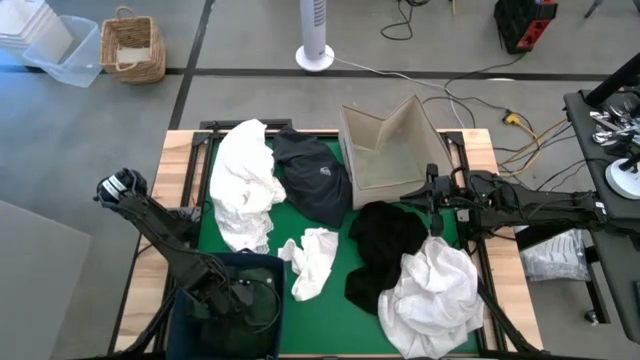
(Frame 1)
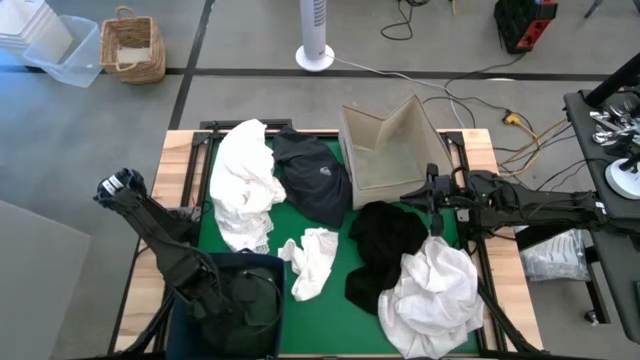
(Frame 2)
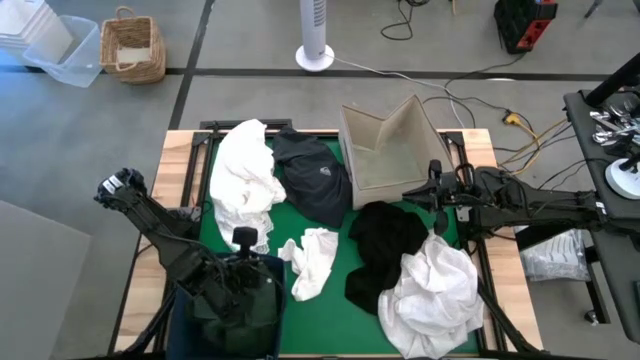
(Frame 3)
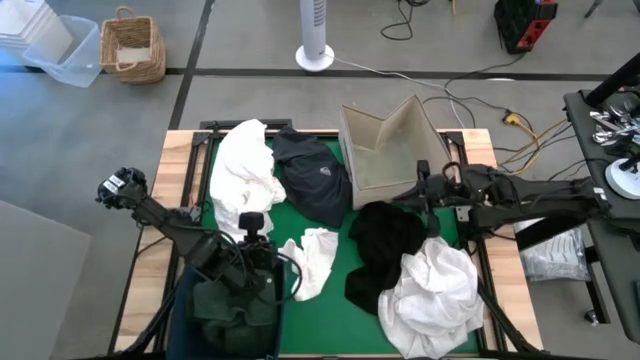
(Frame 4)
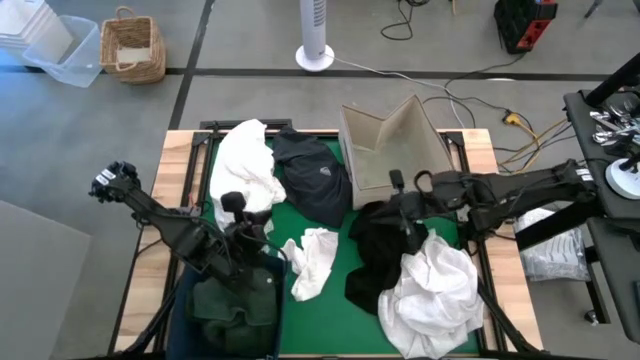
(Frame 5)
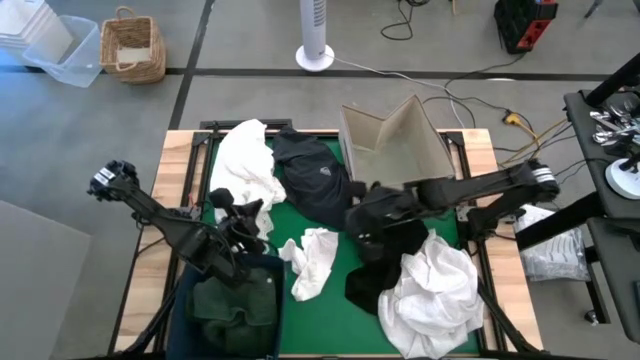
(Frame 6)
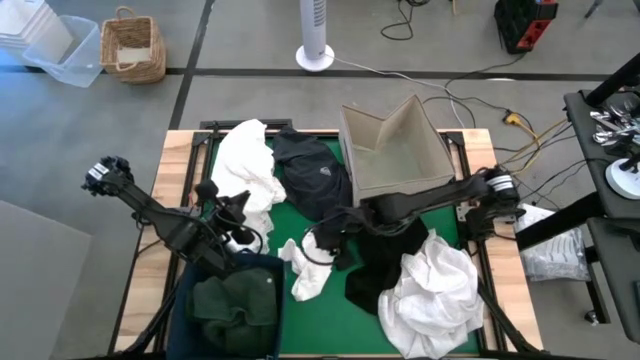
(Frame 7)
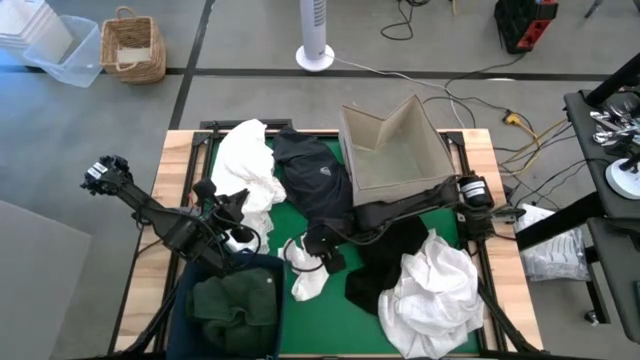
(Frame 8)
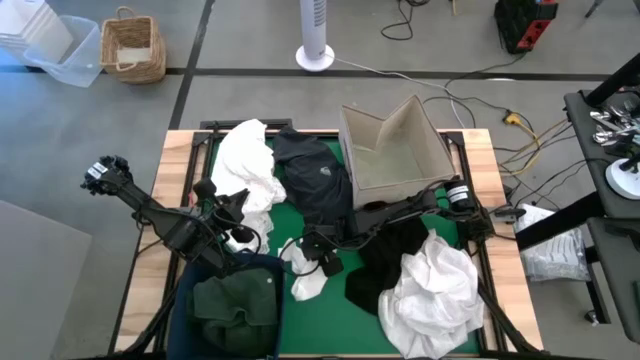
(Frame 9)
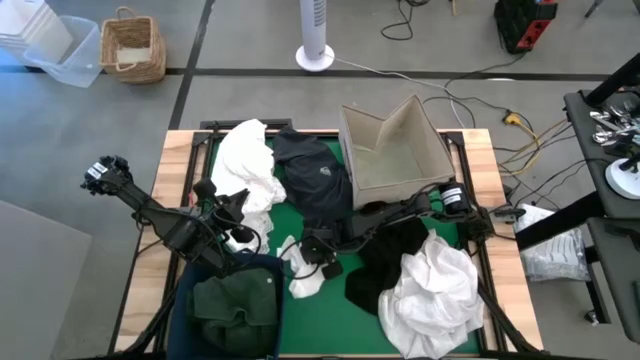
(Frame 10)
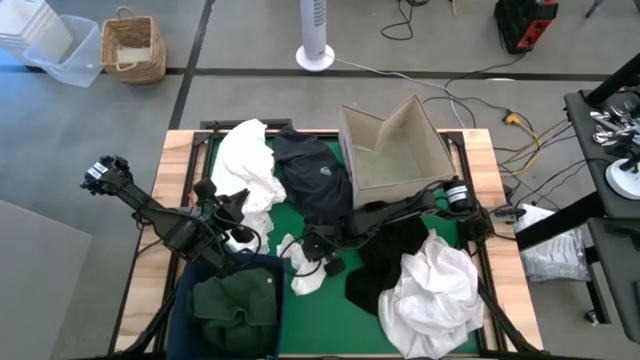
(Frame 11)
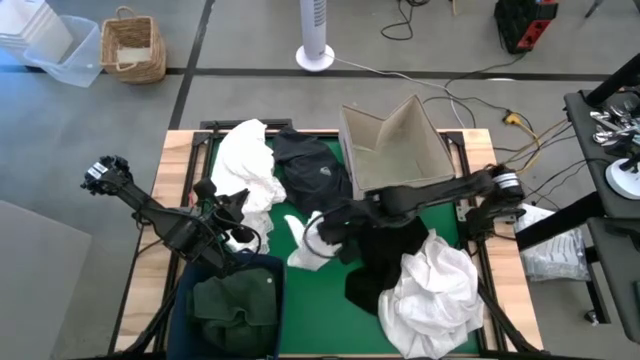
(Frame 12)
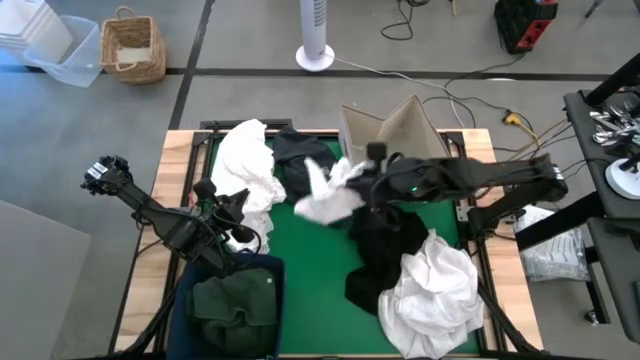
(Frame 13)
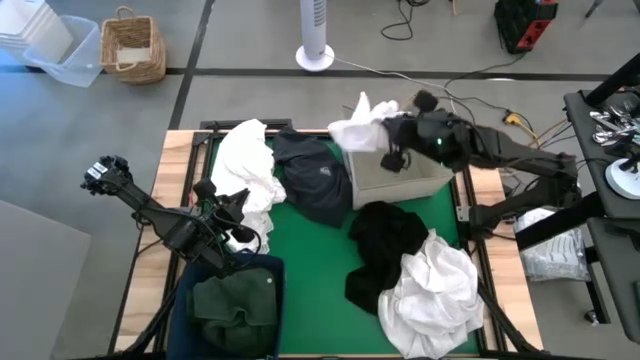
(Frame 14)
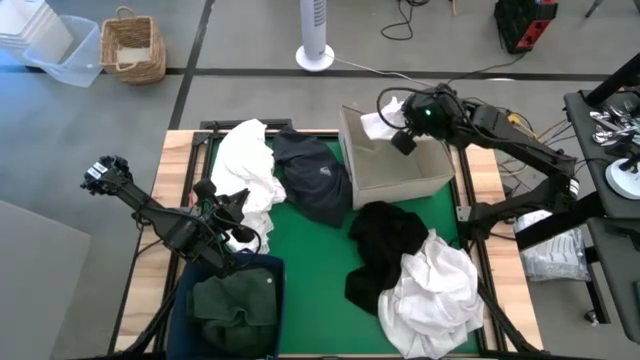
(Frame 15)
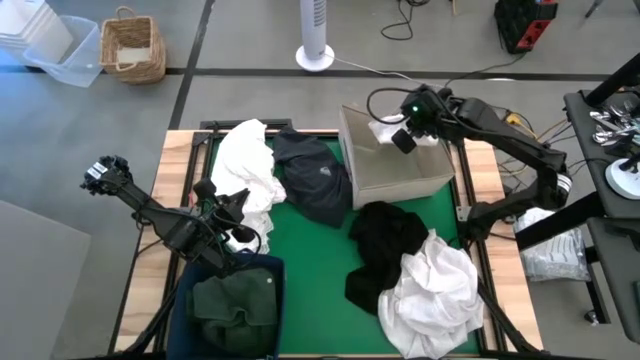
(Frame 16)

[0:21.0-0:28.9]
Put the white underwear into the brown laundry organizer

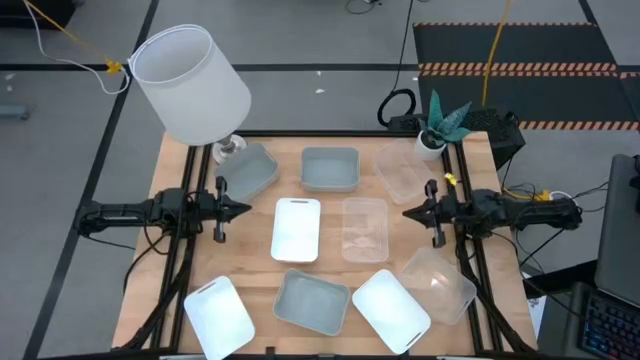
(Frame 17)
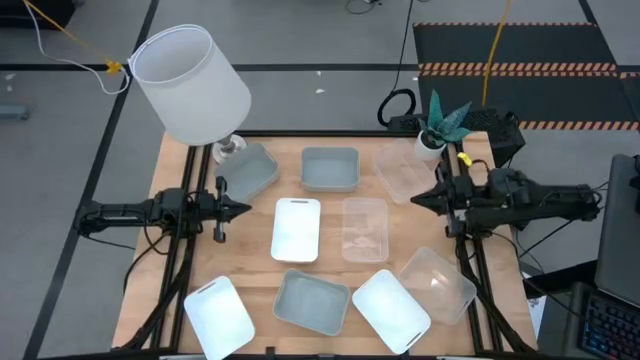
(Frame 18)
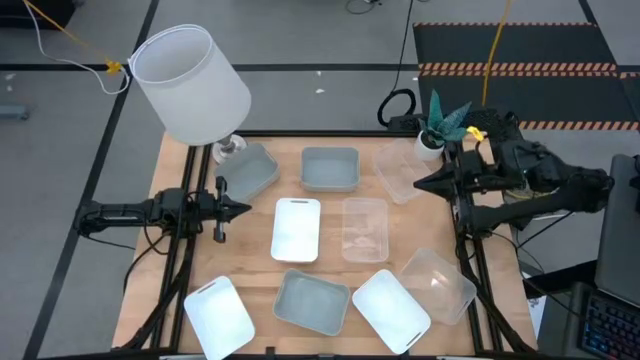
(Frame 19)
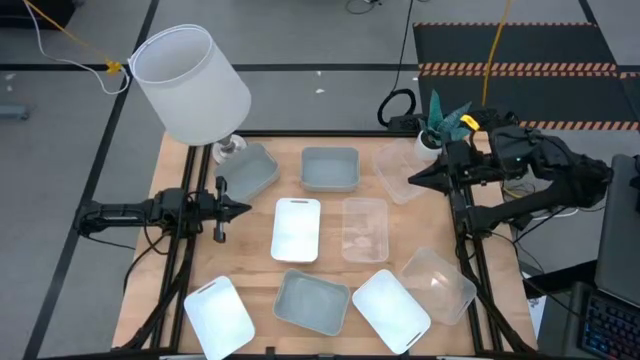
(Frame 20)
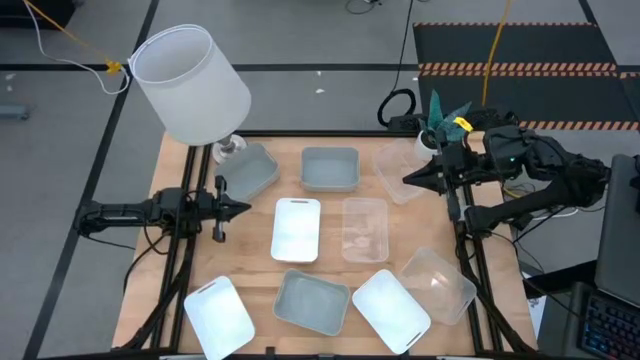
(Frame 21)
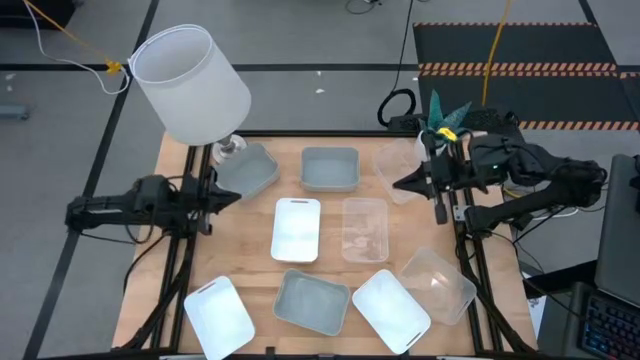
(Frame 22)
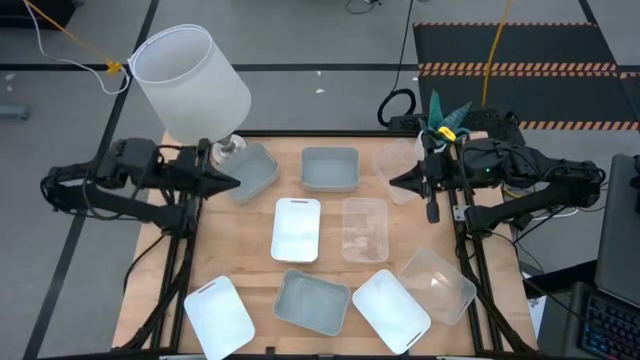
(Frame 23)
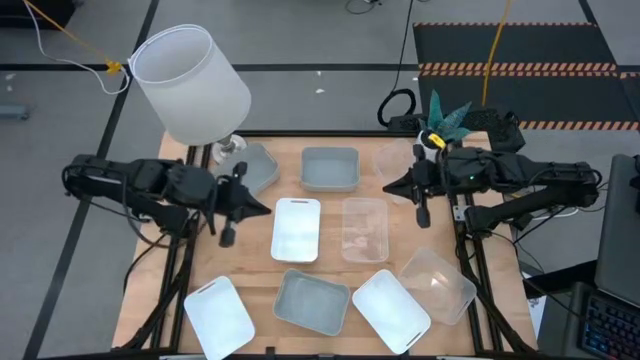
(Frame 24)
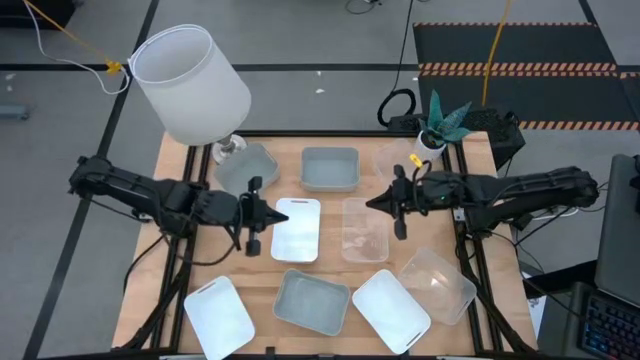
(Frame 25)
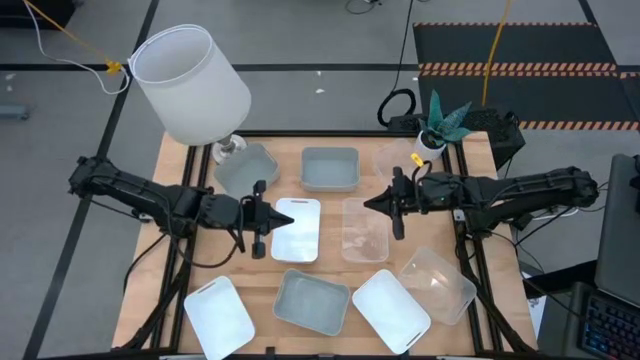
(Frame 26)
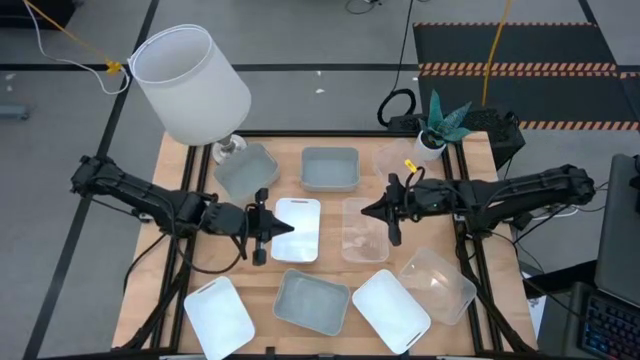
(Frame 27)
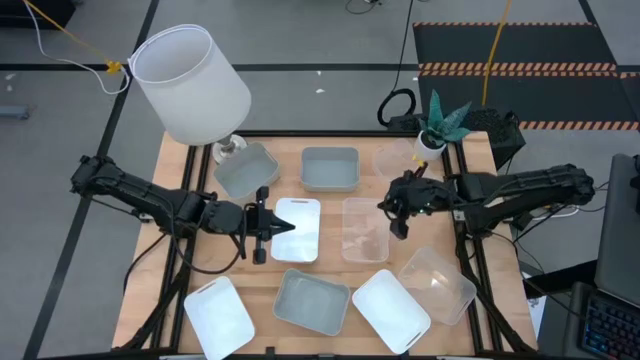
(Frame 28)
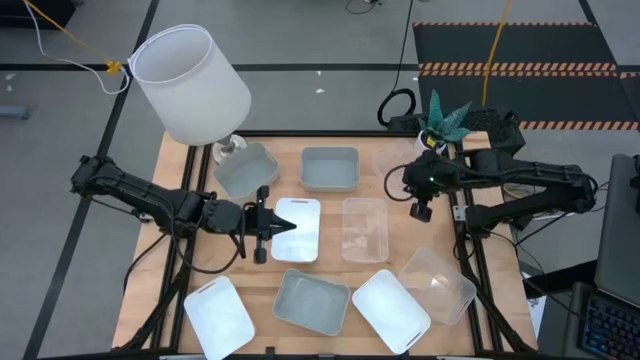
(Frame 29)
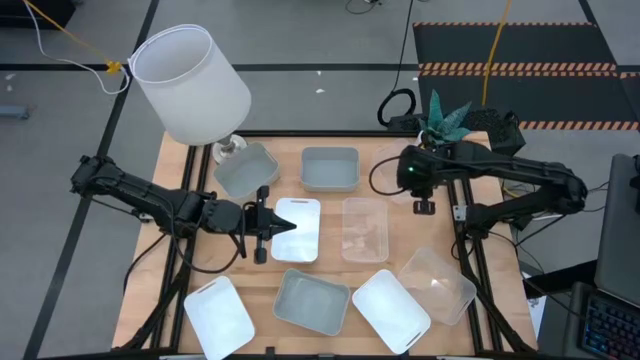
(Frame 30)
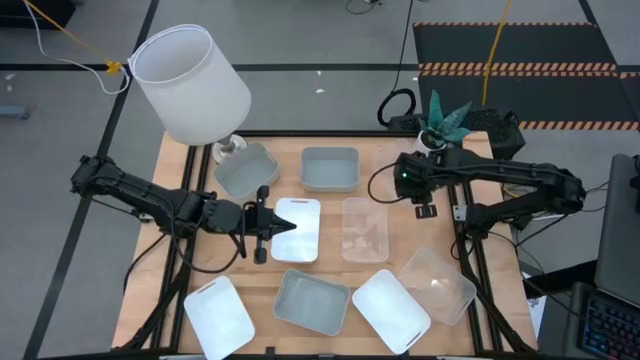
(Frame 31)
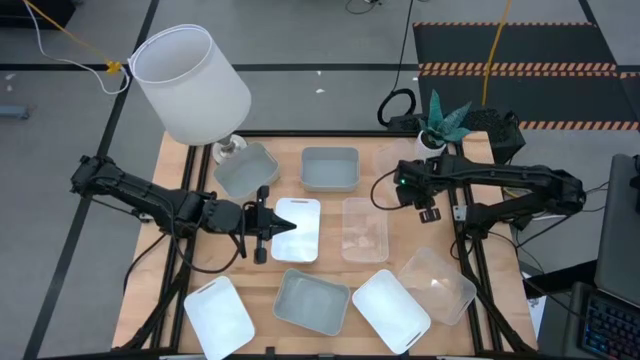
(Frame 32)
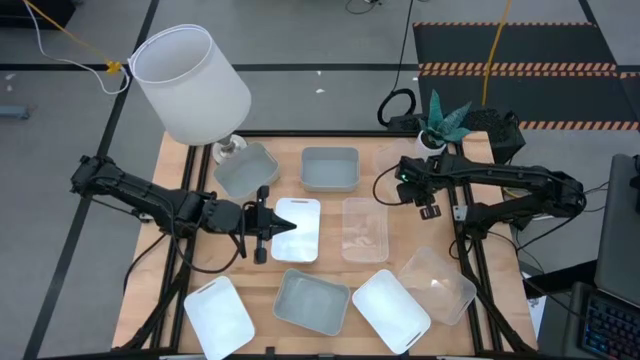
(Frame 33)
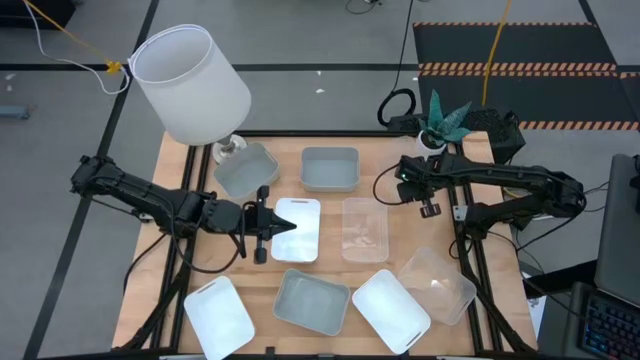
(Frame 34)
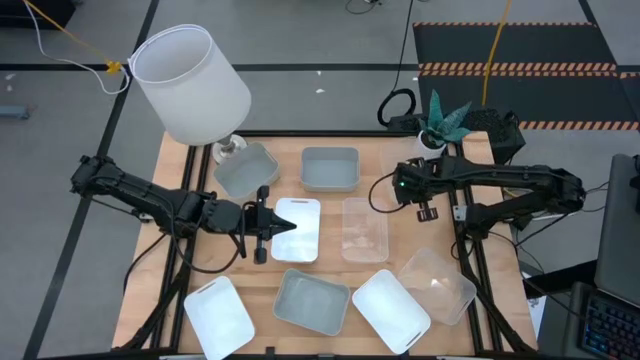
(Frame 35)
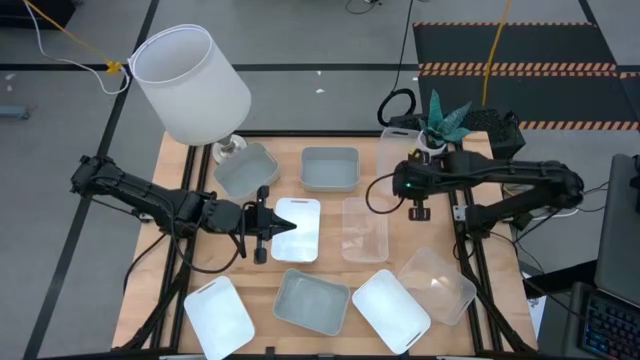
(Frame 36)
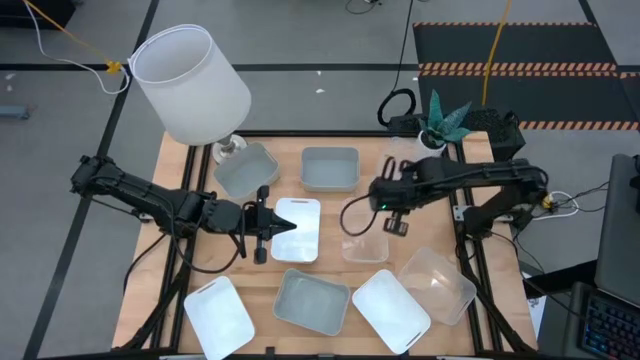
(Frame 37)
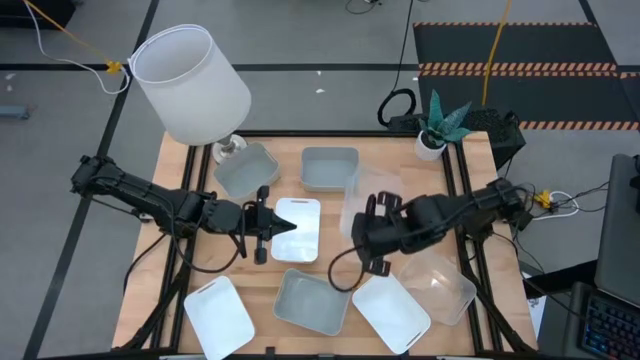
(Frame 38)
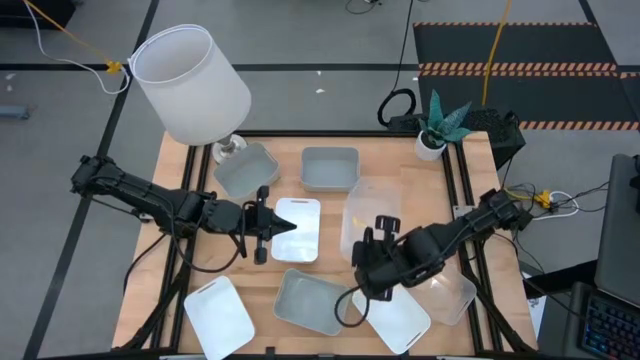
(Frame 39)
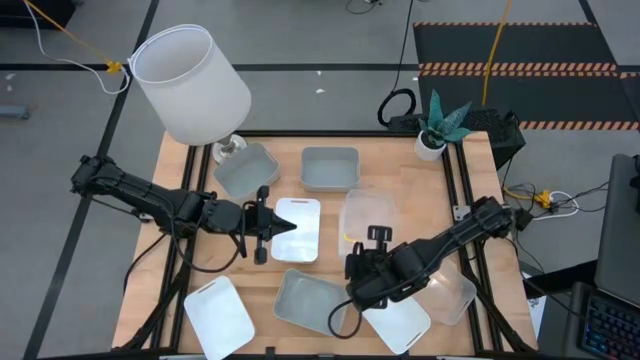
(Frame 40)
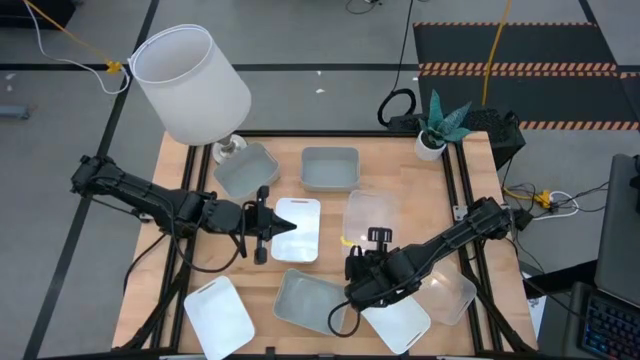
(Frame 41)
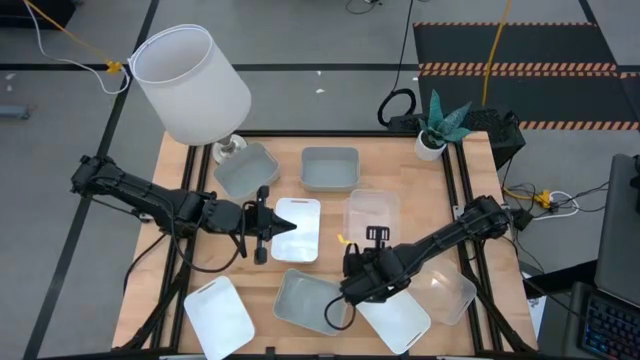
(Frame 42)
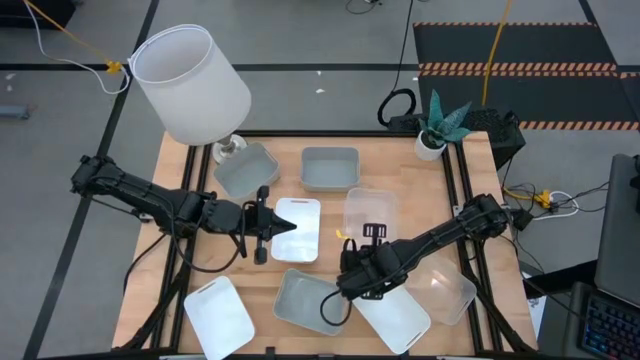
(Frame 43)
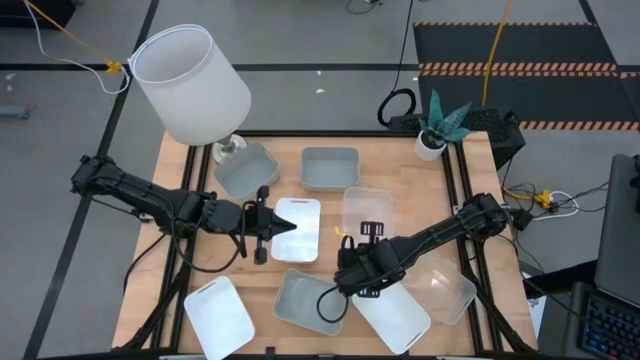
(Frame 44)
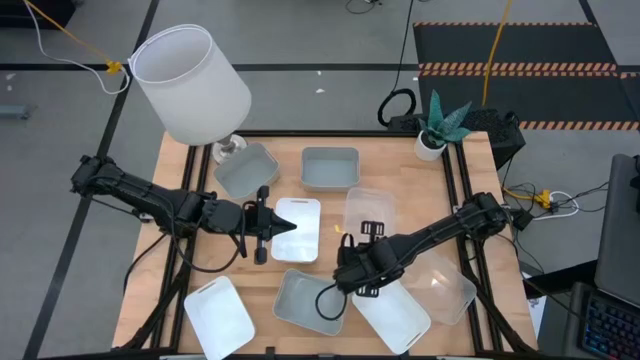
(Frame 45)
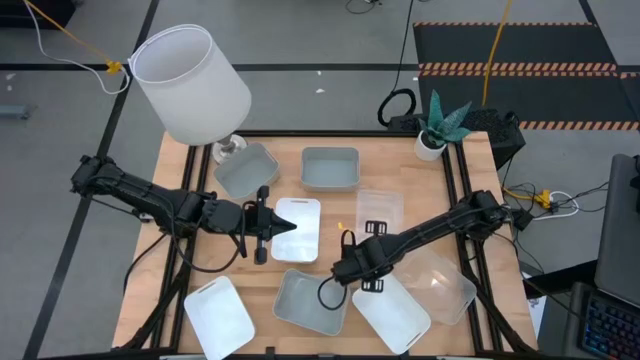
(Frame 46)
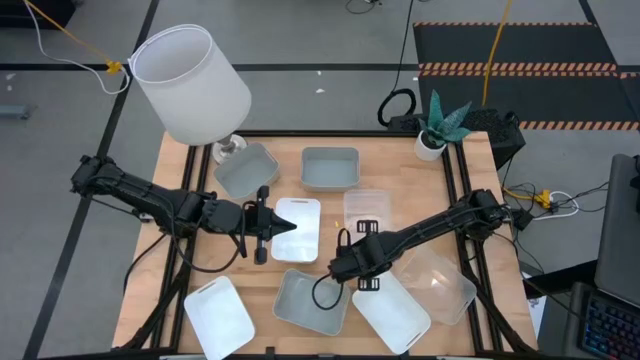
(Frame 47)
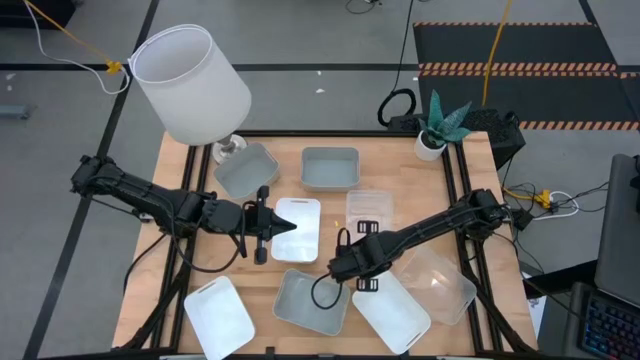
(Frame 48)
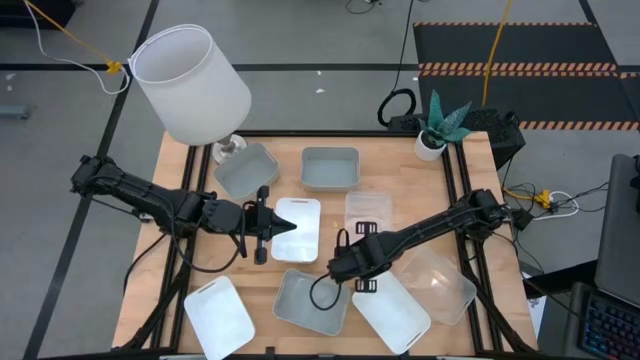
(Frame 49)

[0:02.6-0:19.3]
Stack the top transparent bin on top of the middle transparent bin
